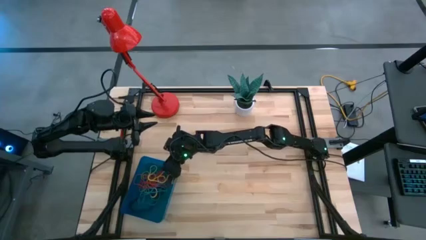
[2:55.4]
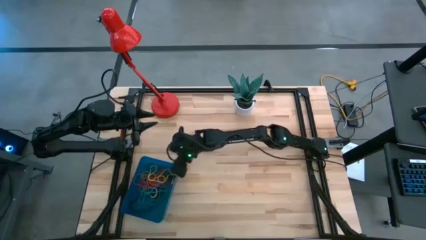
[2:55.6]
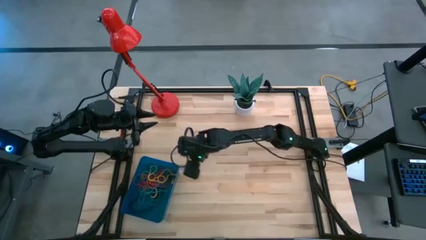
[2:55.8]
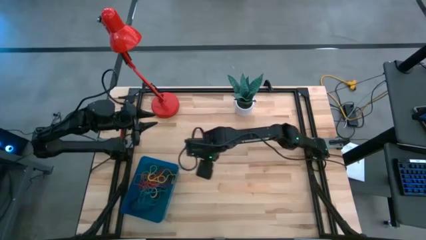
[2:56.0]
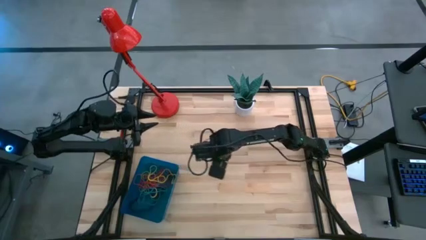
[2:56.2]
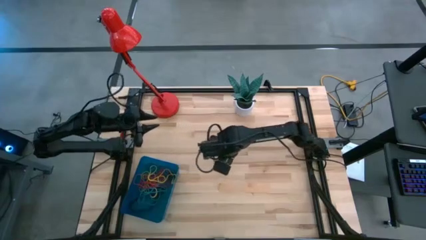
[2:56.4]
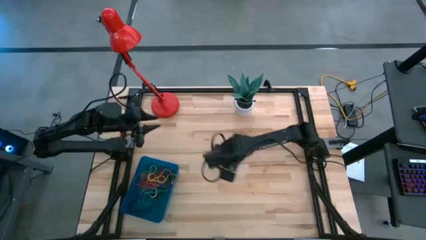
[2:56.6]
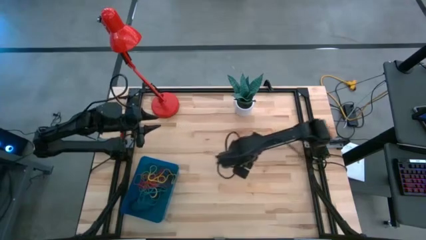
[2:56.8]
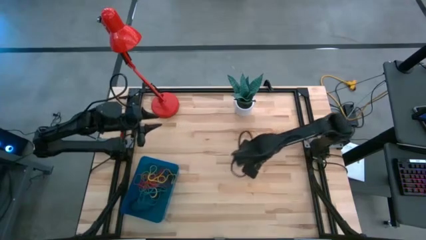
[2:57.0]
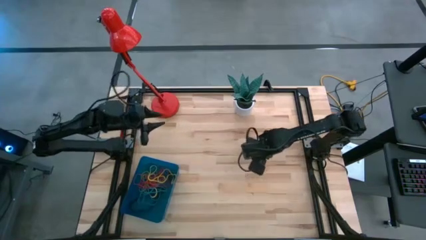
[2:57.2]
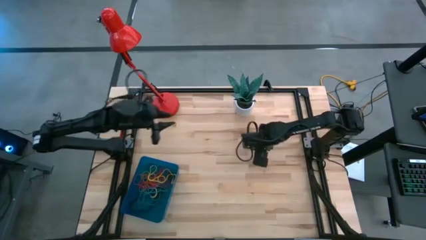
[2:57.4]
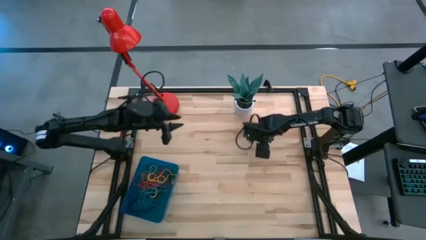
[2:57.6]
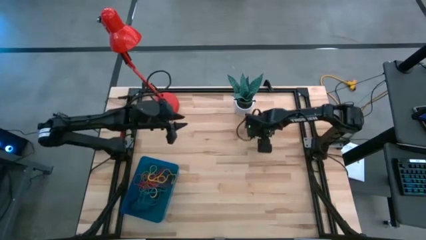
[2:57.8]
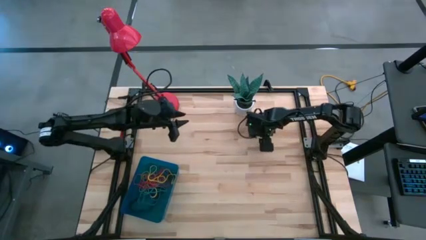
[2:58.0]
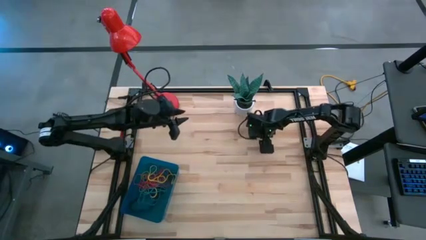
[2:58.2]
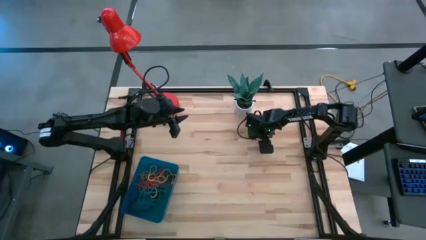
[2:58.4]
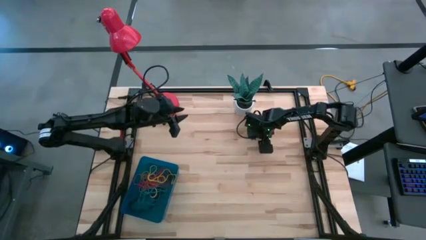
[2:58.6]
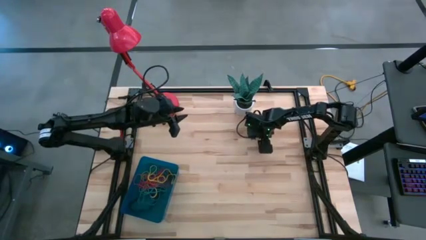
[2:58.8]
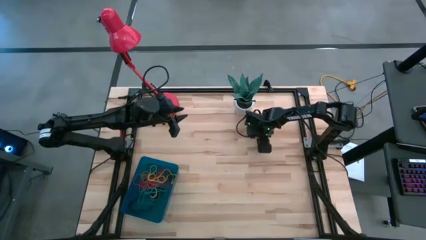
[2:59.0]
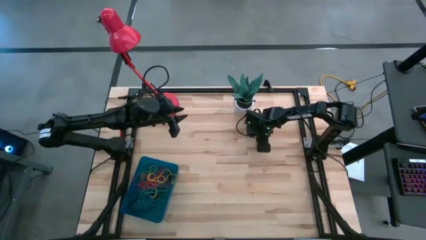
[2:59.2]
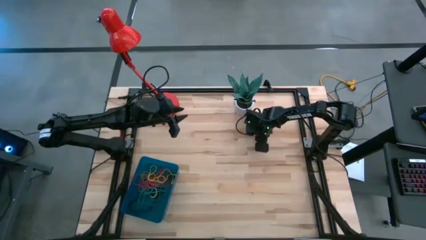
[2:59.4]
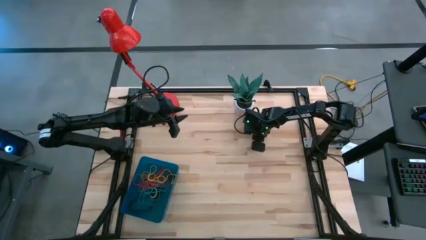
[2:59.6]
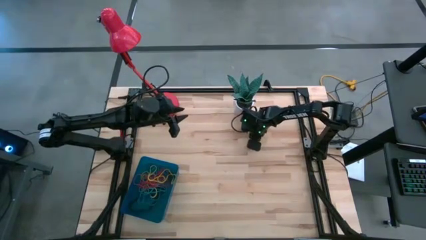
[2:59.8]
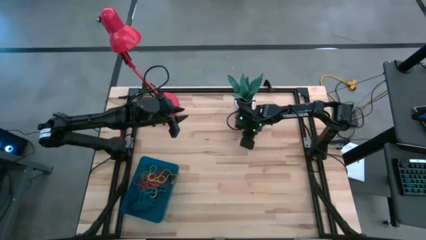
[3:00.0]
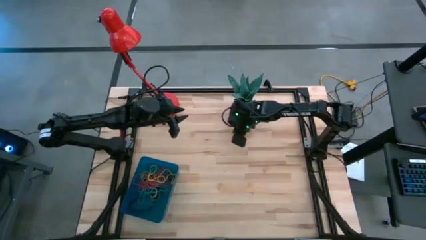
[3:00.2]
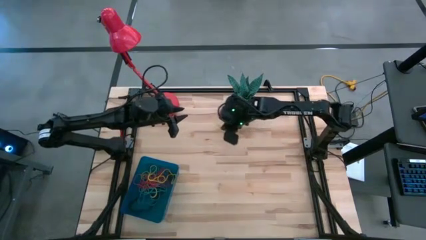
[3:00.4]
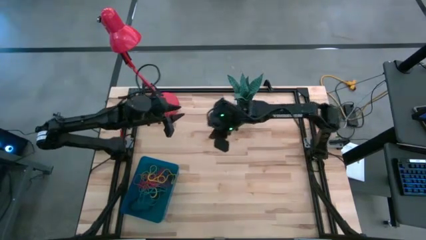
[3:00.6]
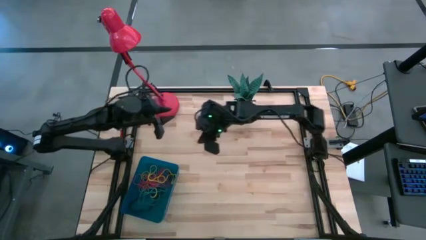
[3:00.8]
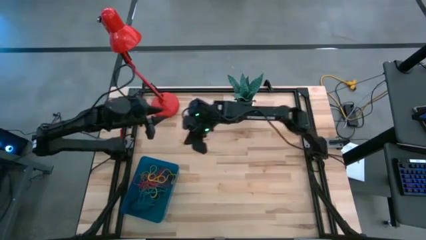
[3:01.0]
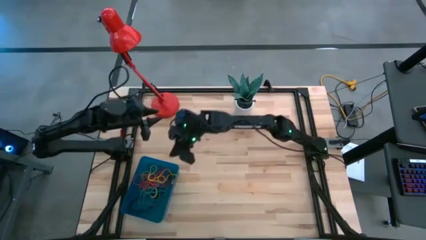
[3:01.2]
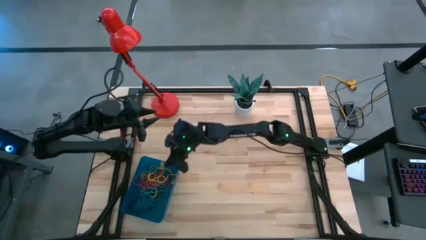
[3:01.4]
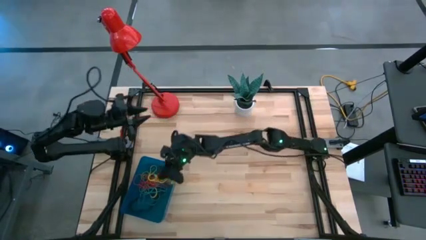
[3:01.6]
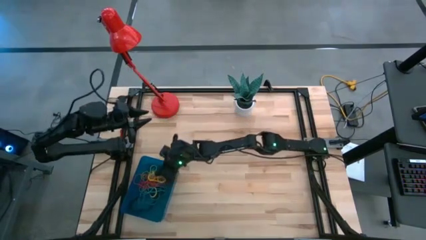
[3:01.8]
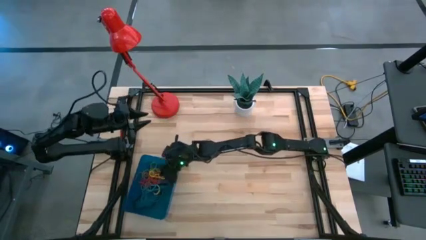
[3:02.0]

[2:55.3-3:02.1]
Task: Pick and place rubber bands into bin
Put the yellow rubber band into the blue bin

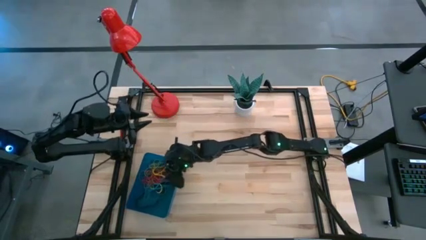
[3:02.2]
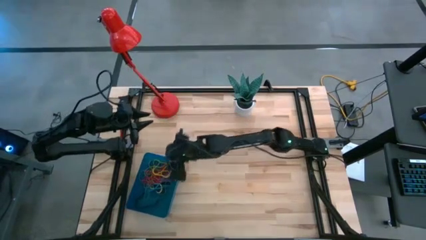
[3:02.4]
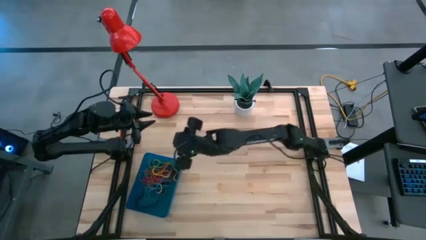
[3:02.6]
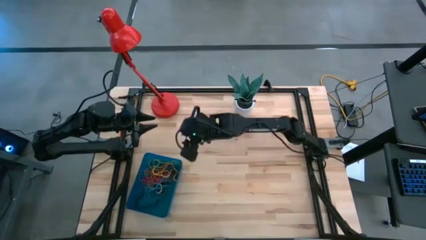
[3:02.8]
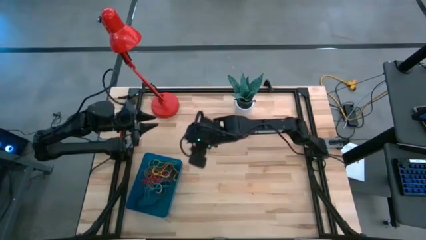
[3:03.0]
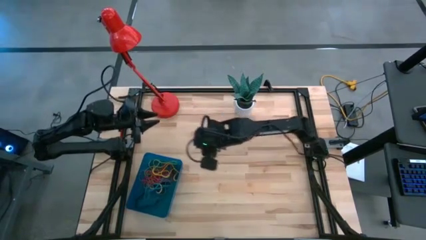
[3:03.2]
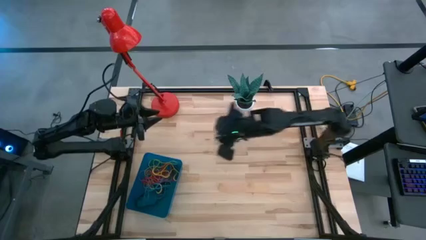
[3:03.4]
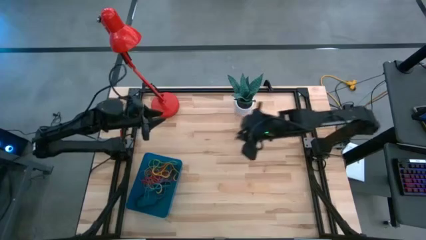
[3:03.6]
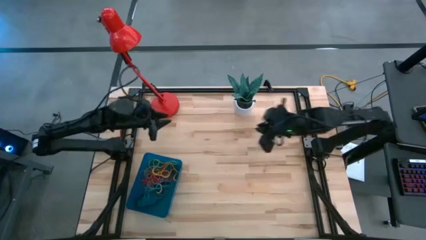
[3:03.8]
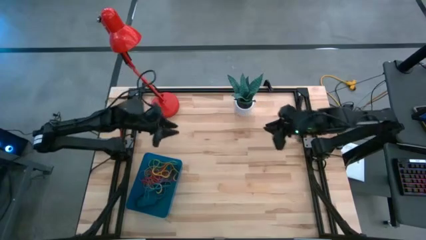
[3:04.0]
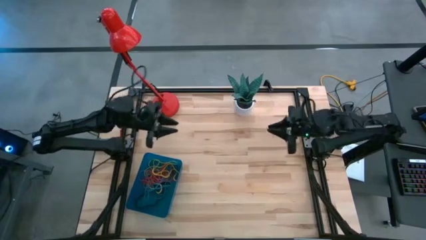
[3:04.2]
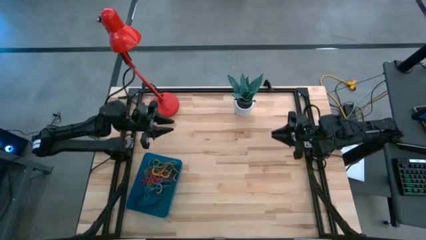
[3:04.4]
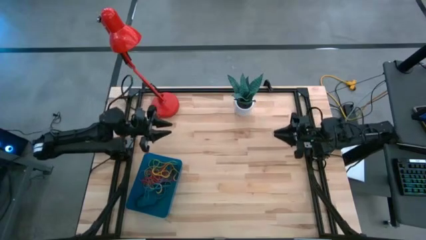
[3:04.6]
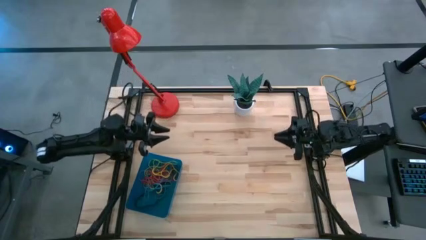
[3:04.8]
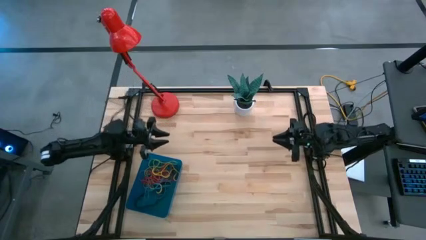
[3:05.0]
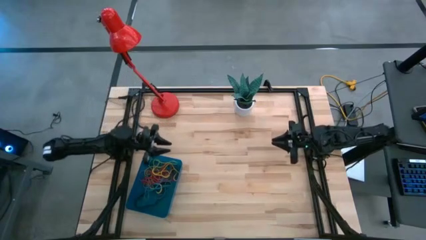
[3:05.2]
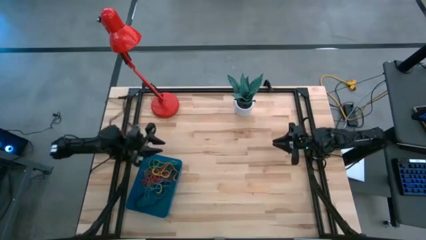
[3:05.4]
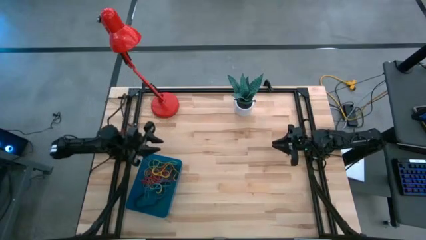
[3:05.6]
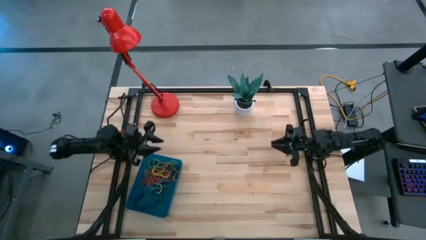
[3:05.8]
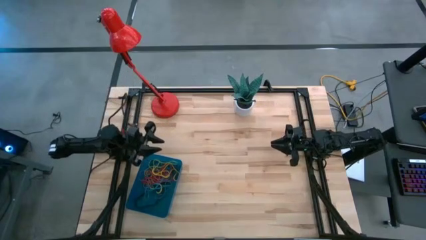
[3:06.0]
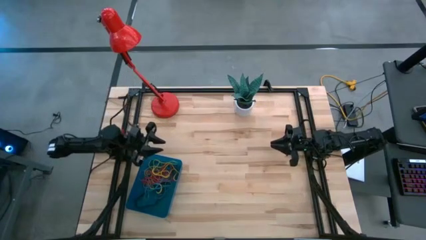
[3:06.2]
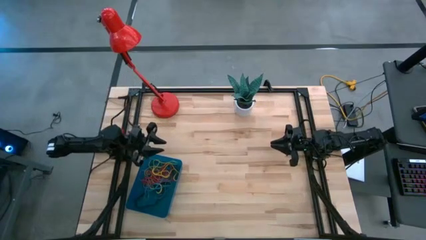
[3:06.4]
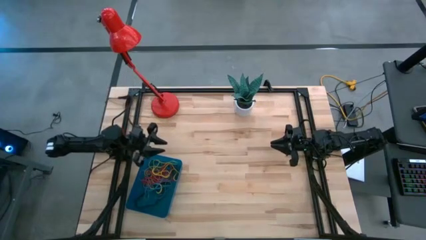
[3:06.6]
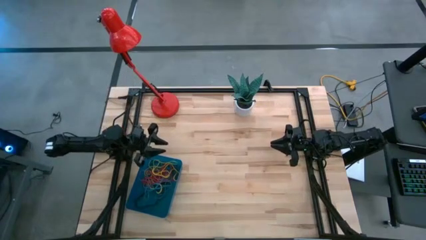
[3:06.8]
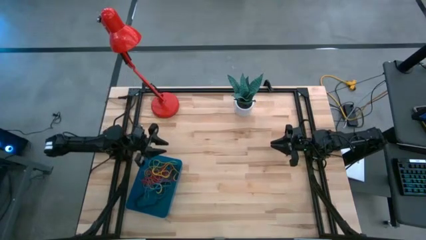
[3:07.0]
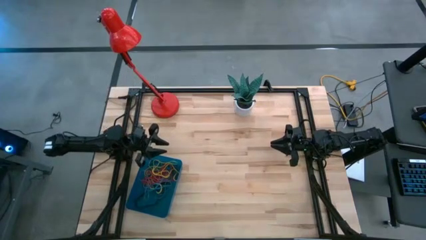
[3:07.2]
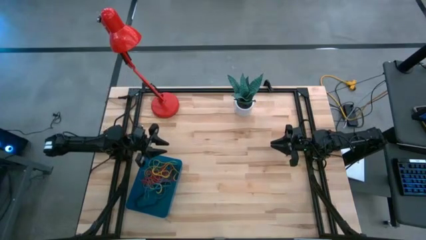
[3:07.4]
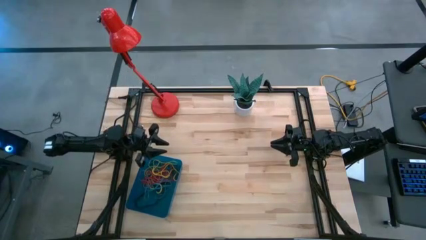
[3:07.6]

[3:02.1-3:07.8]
Return to Home Position

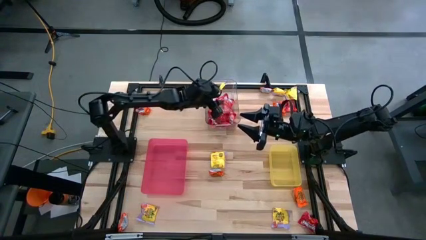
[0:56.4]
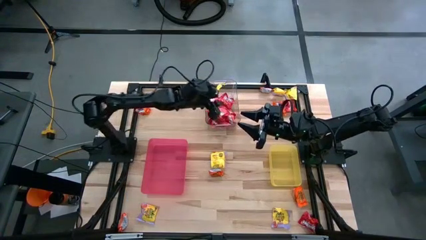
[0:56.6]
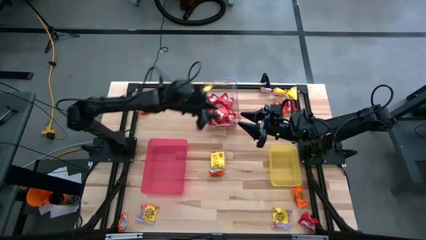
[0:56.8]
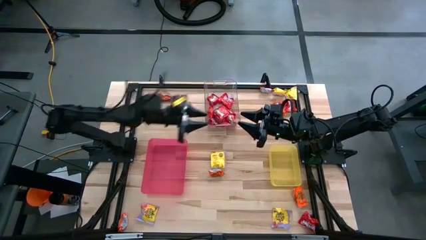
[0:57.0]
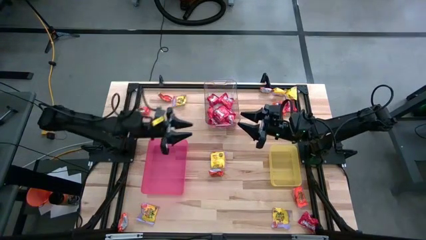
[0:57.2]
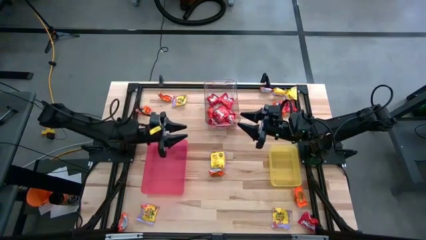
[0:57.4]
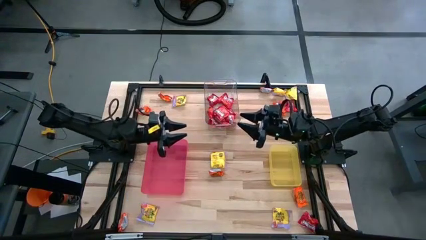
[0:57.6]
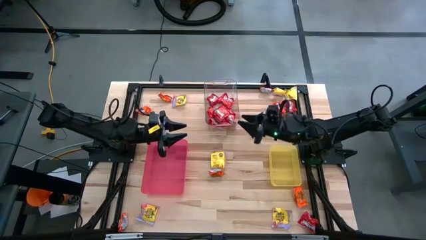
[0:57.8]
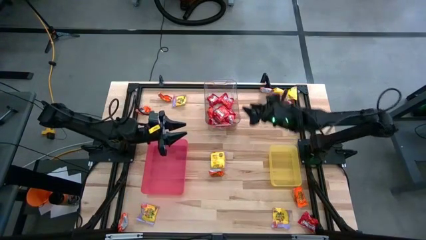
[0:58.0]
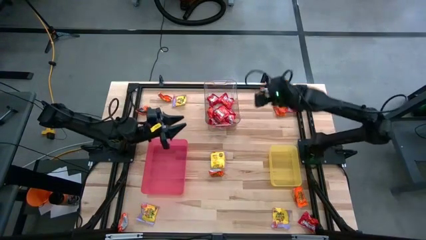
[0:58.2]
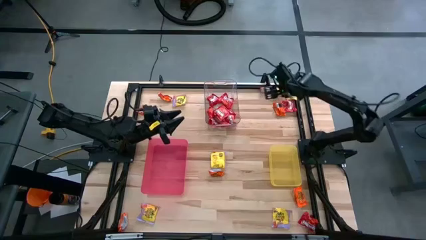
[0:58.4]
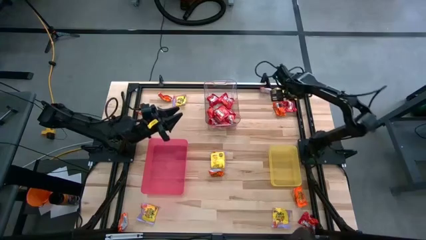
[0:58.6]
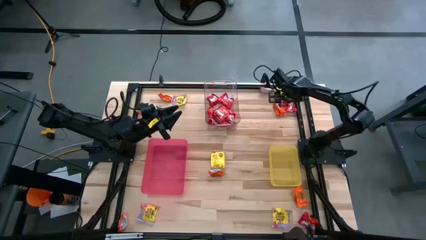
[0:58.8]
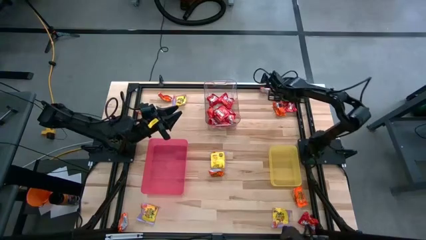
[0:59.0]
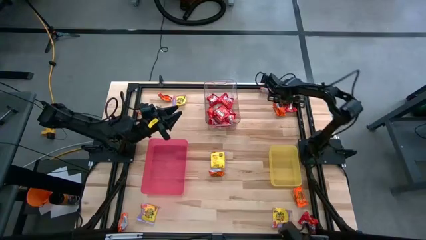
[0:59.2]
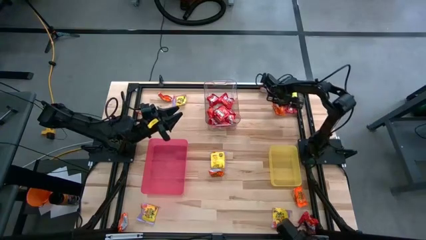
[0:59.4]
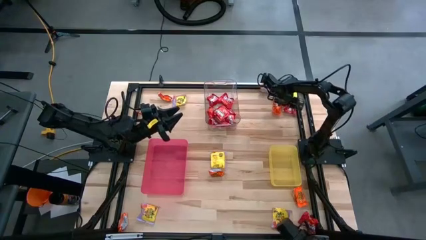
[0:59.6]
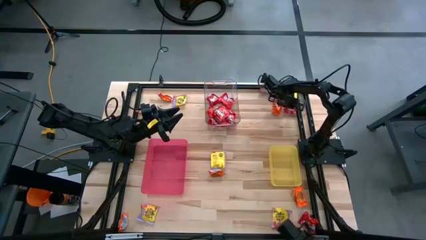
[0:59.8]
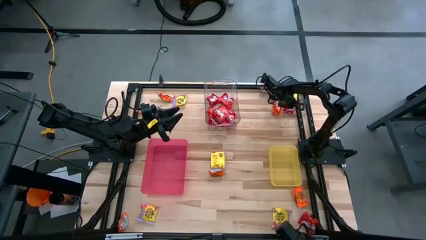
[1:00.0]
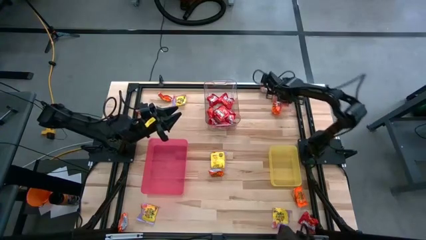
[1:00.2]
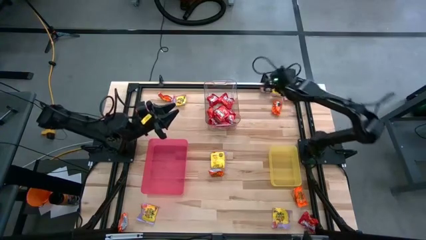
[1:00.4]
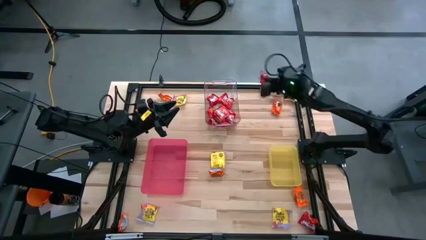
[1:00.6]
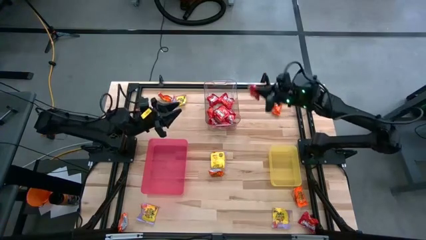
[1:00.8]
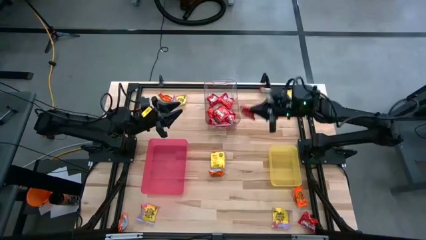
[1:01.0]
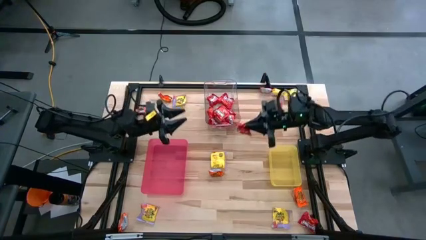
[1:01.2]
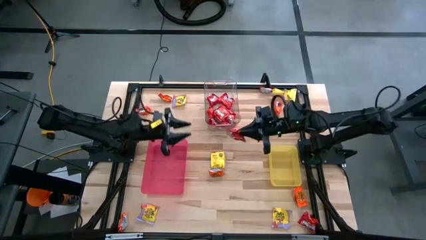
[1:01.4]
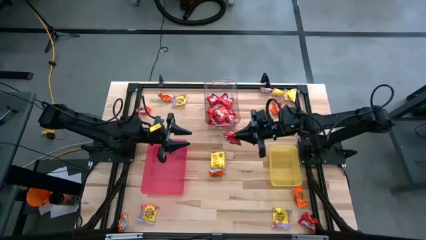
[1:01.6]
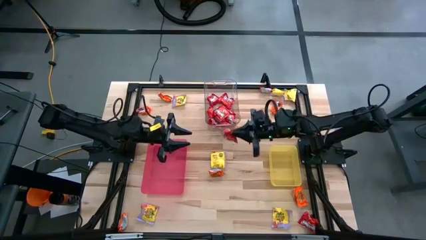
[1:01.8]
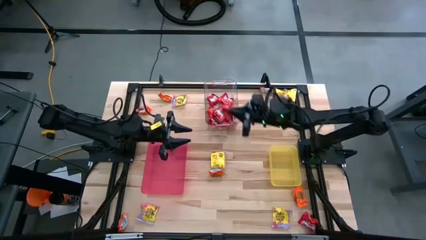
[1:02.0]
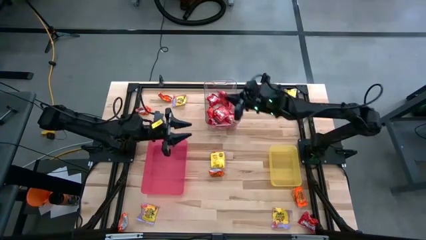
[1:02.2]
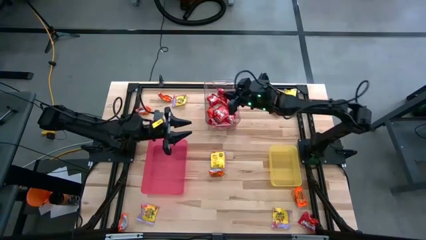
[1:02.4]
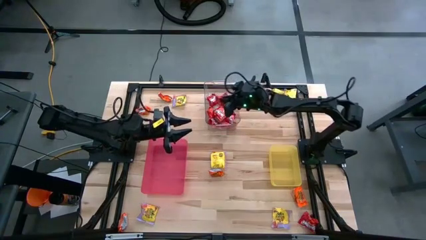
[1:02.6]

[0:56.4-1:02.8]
Task: Sort candy
Put the red candy into the transparent bin
